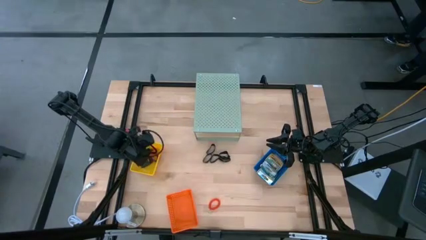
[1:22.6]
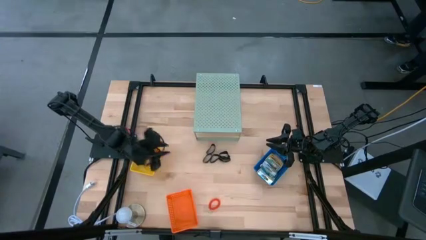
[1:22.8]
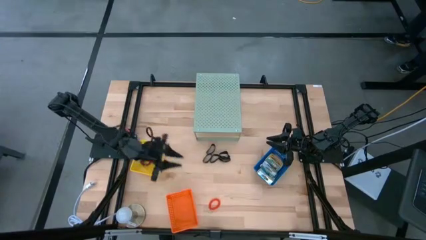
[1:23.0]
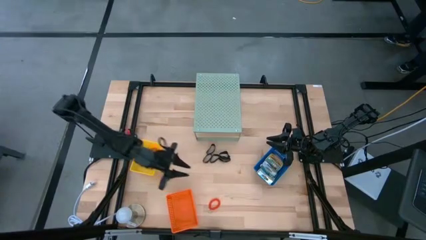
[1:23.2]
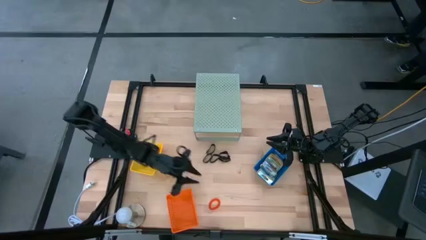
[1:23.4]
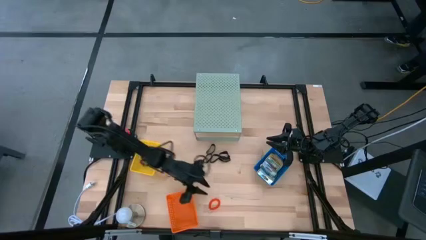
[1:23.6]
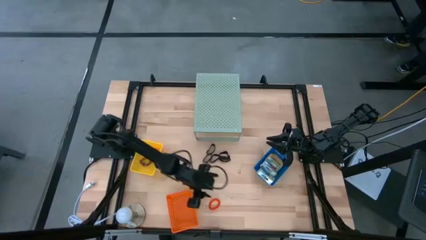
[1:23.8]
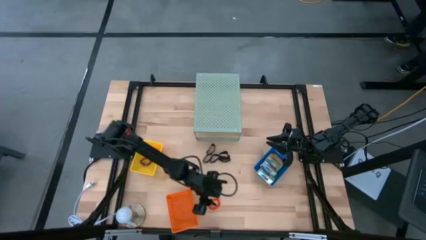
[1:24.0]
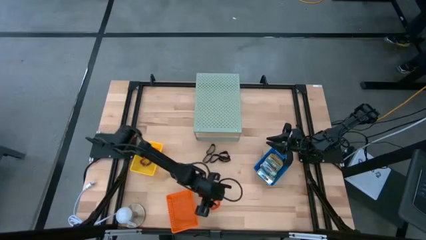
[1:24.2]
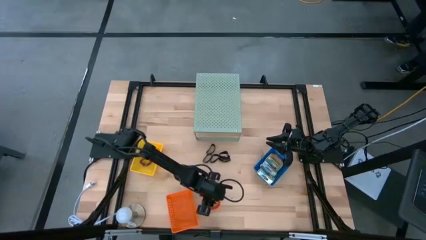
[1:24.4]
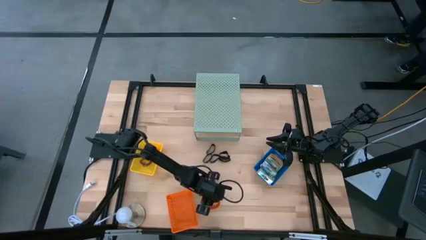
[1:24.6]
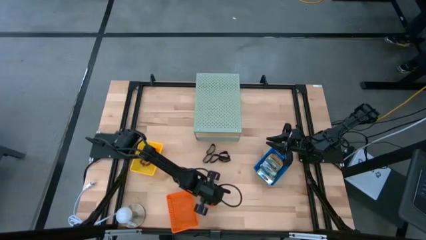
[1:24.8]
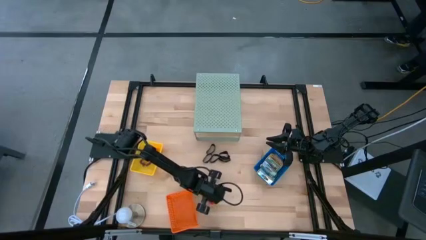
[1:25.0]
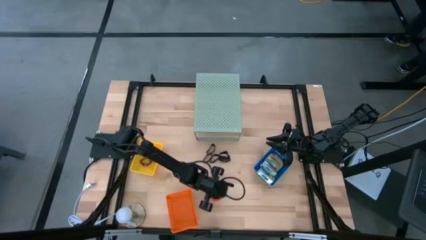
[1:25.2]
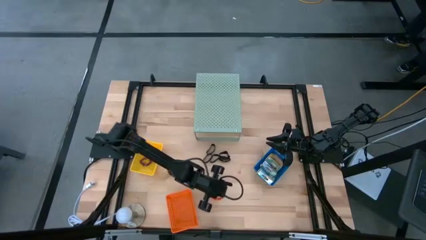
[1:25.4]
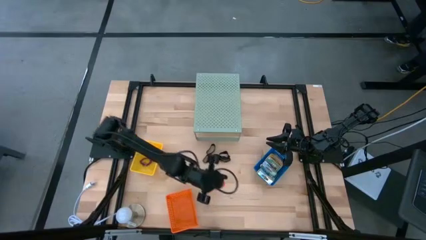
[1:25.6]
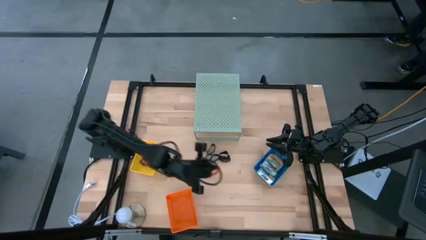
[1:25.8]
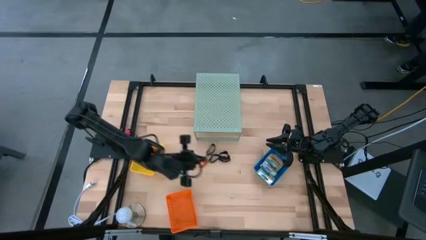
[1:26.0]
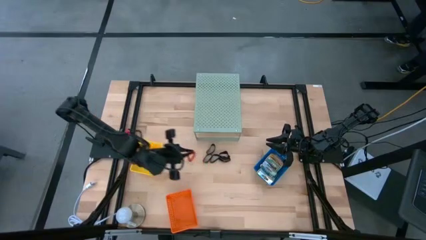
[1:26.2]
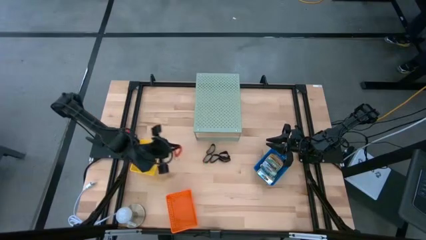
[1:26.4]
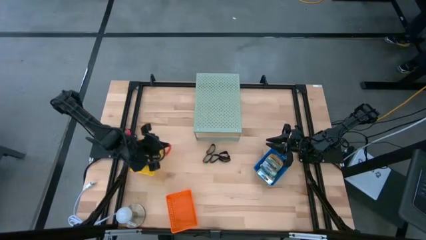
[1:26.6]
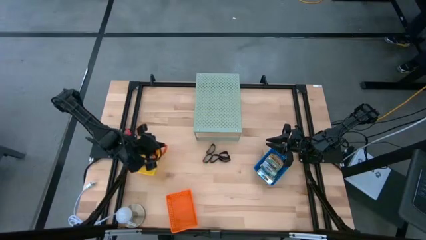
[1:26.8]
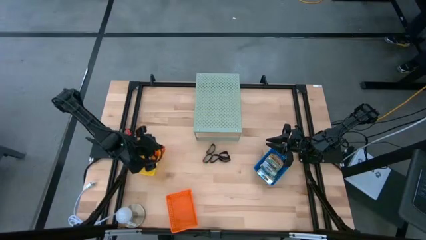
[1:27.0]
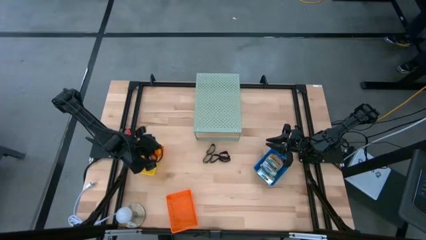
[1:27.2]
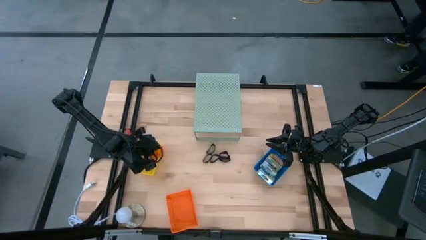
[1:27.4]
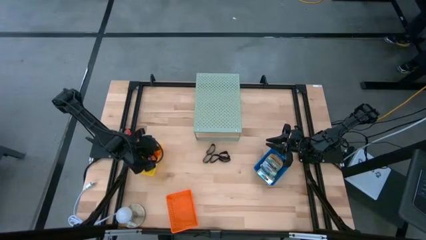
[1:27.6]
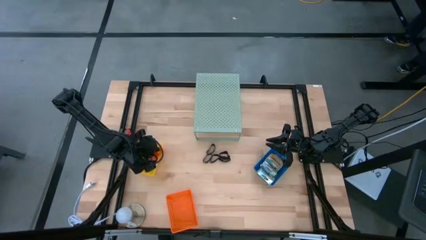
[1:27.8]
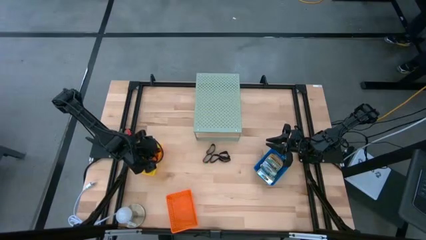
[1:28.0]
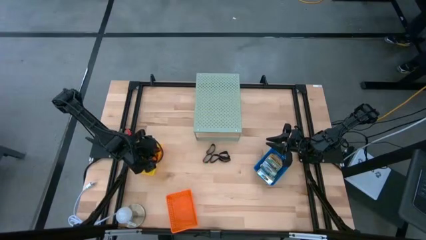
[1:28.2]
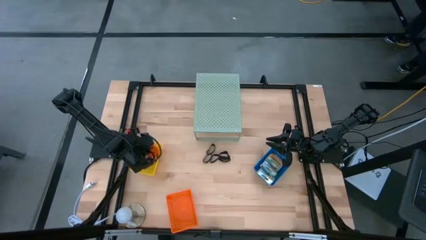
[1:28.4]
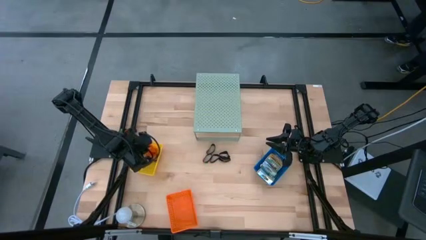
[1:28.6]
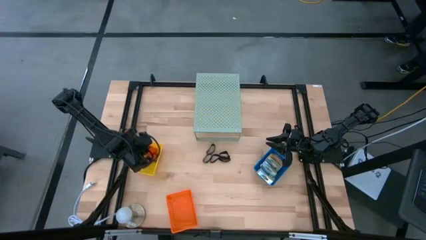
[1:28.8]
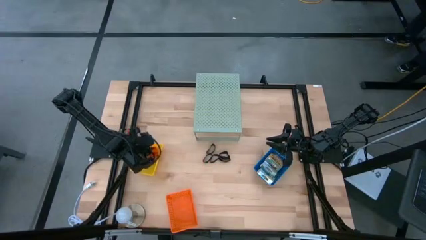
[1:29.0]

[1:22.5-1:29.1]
Task: Pick & Place Office Desk Supplies
Put the orange spring keychain into the yellow bin

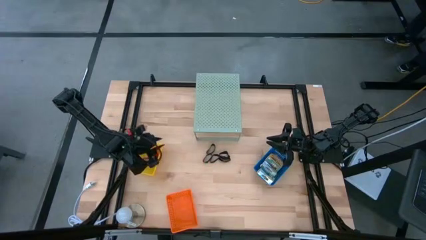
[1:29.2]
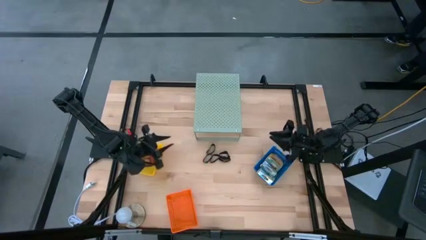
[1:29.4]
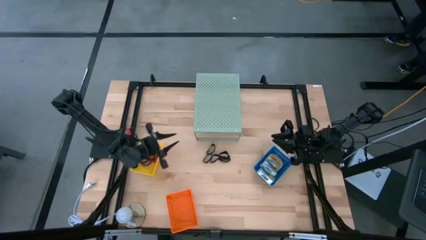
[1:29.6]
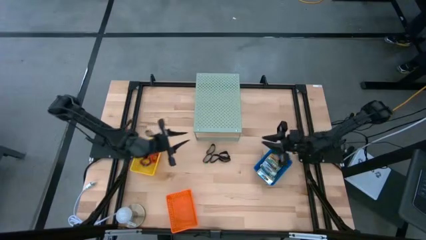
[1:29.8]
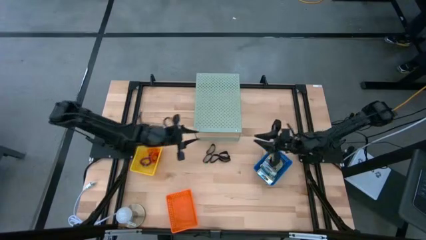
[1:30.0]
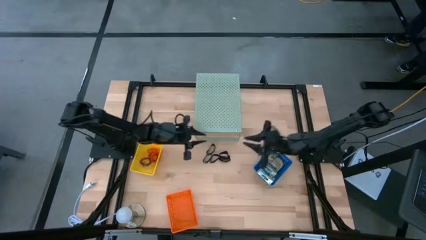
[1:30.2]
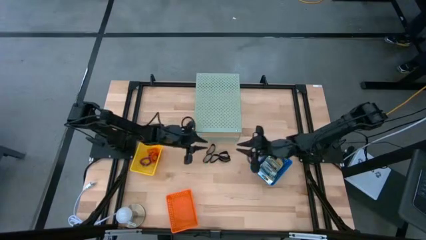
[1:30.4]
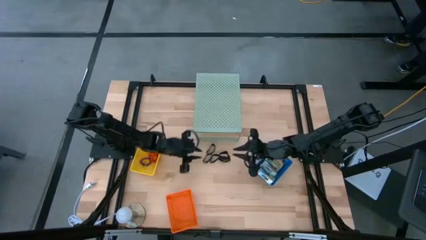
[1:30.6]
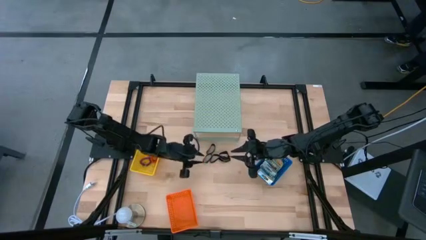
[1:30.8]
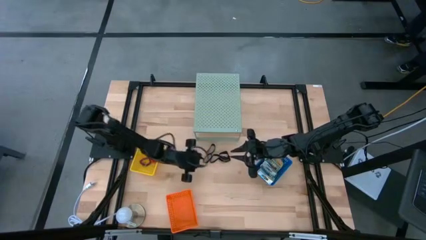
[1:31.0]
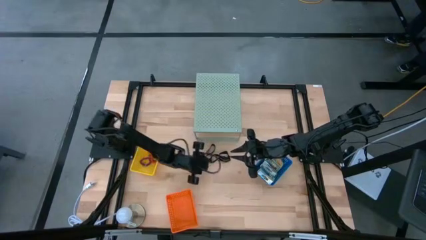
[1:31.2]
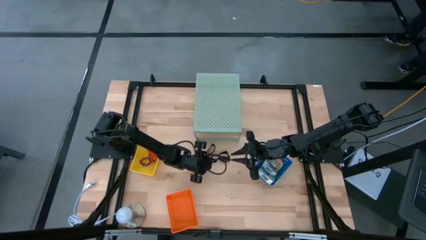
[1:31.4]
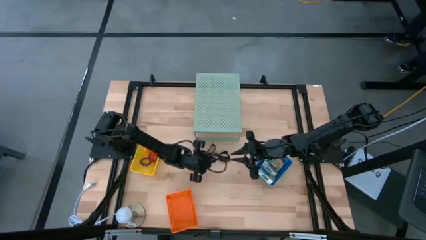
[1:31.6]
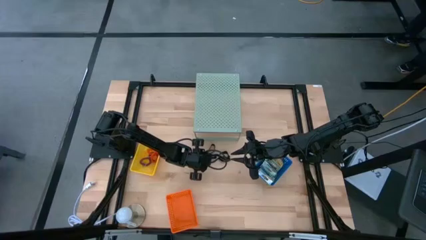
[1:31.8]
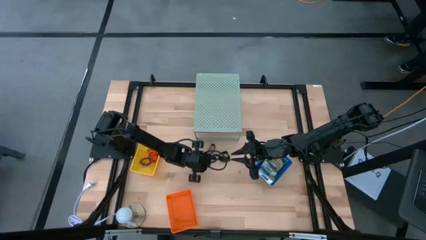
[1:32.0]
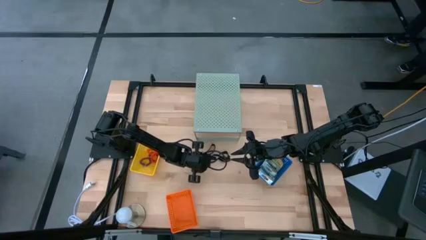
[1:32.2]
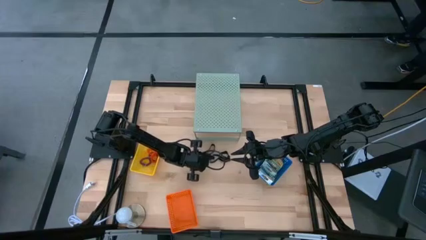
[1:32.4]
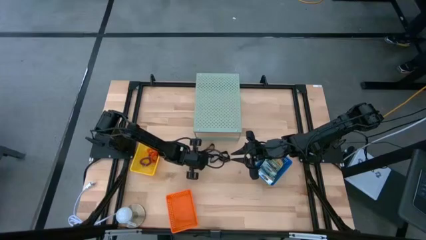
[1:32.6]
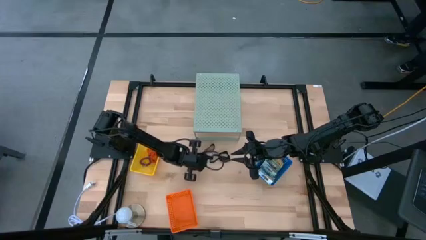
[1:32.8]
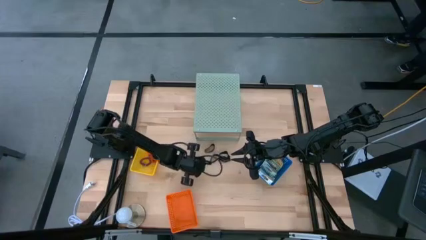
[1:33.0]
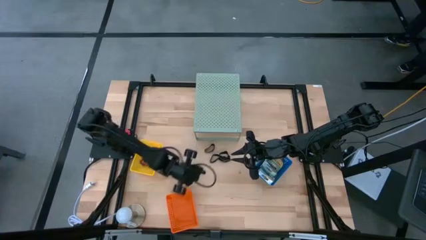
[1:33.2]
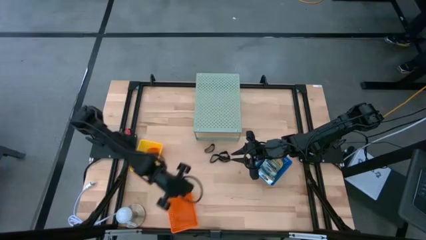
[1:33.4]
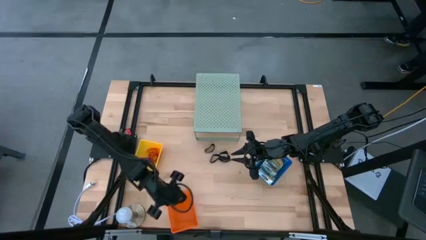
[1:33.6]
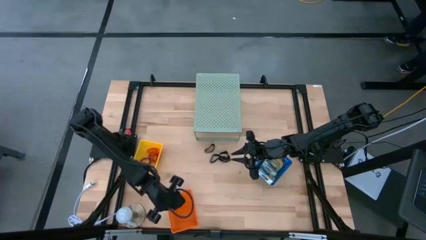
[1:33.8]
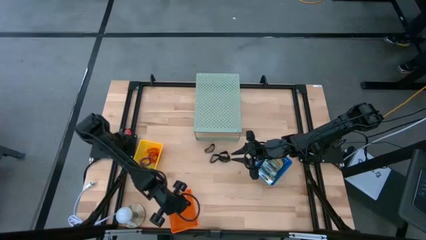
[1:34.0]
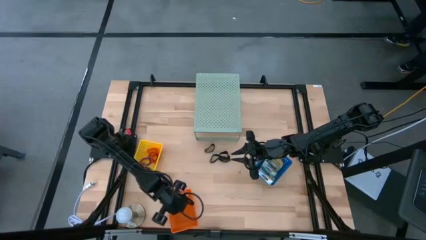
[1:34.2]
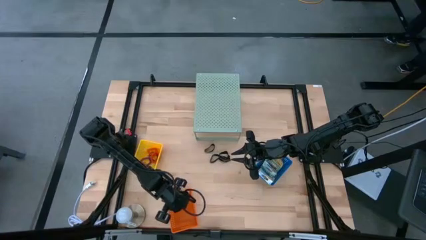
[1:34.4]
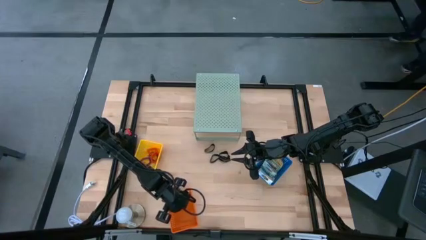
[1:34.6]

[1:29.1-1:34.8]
Put the black rubber band into the orange bin

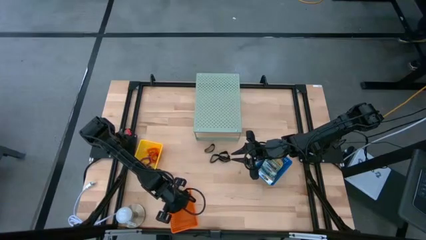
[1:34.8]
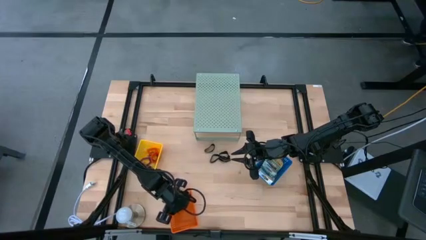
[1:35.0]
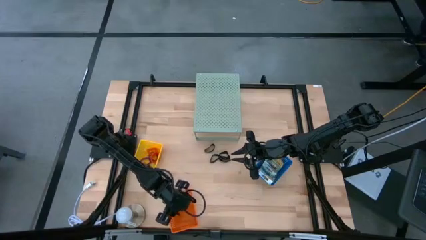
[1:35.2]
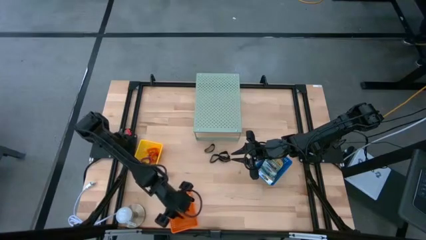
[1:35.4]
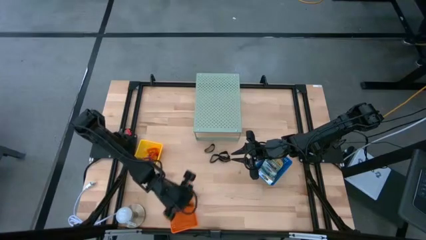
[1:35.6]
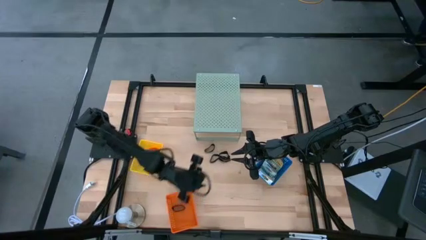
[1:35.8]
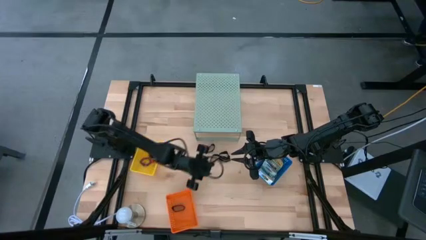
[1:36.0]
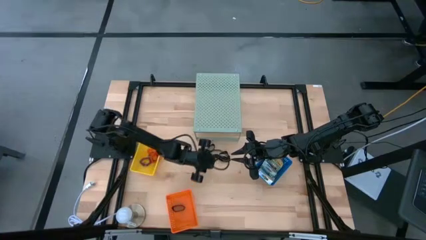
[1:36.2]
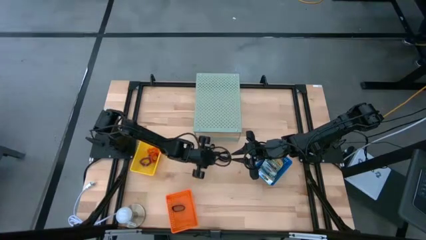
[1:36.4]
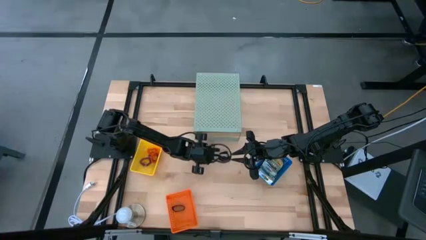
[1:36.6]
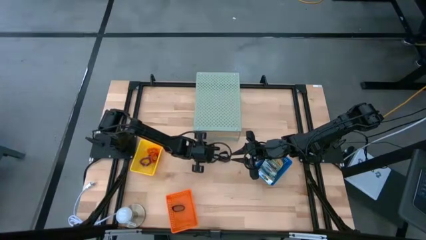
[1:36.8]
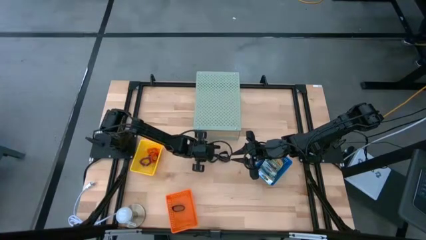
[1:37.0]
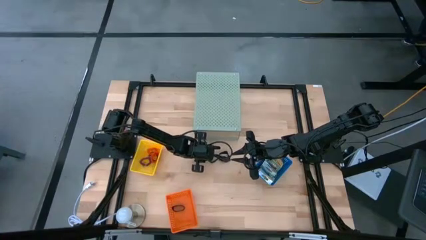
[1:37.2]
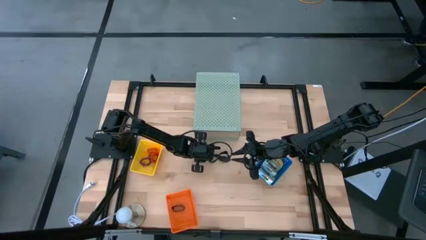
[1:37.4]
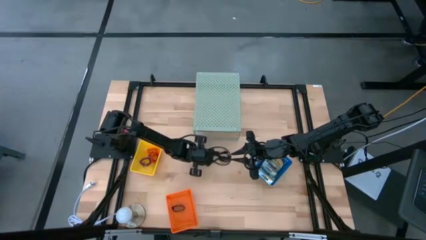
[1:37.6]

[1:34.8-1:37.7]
Put the black rubber band into the orange bin

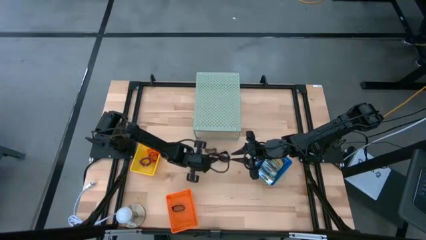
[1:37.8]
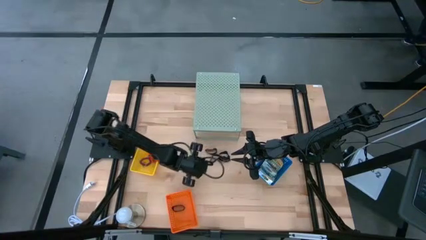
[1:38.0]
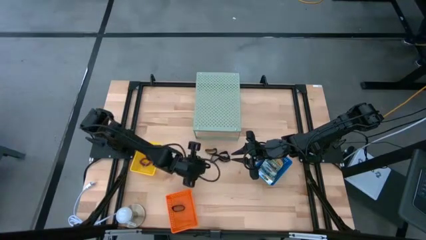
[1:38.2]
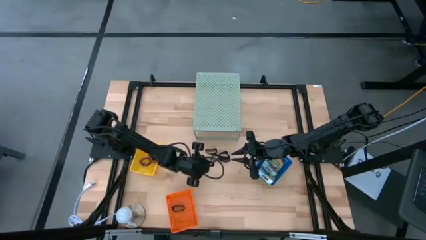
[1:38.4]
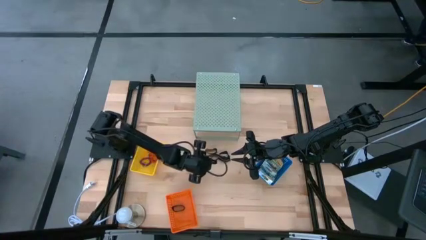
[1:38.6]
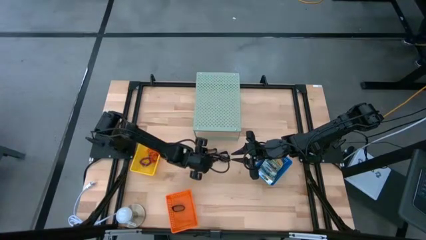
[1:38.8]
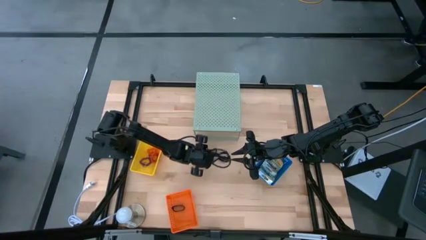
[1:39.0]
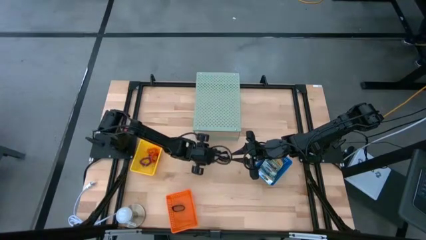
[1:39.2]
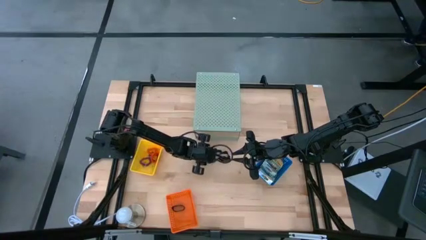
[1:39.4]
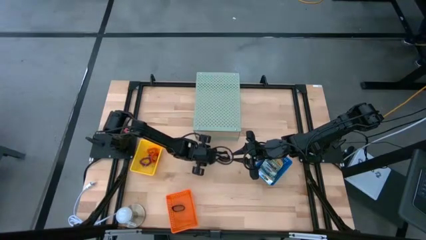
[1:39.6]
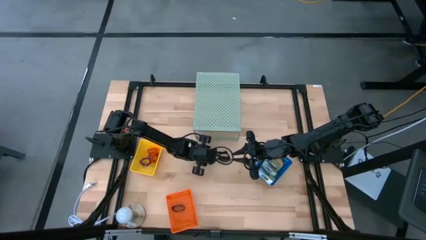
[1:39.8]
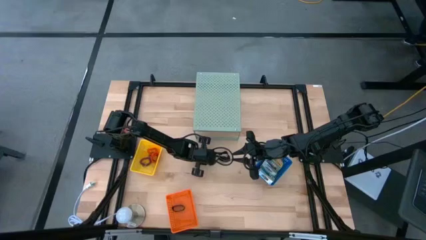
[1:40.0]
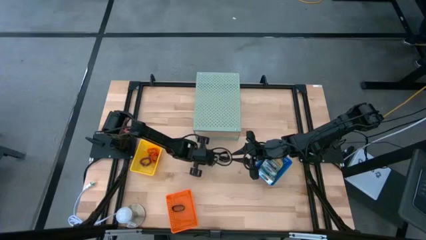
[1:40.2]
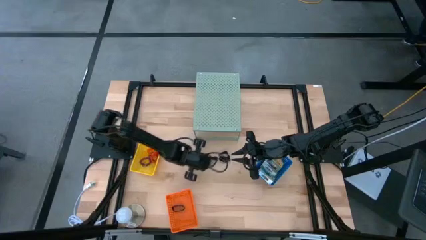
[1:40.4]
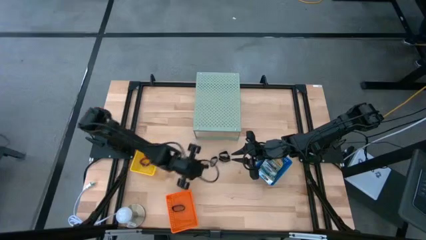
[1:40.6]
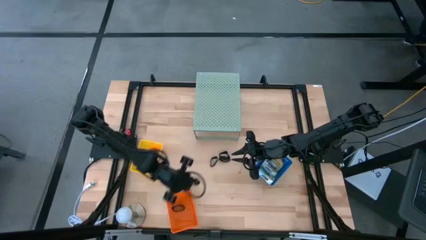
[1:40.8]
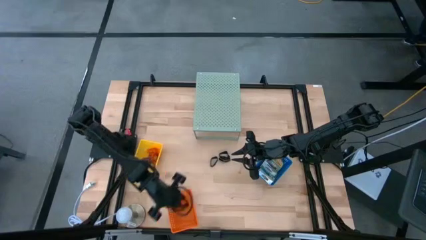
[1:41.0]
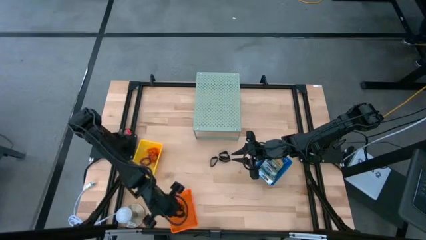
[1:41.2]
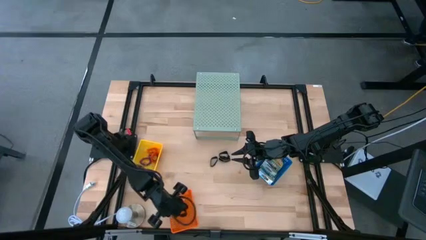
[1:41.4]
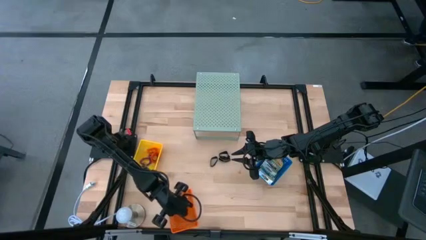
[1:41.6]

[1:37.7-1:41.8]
Put the black rubber band into the orange bin
